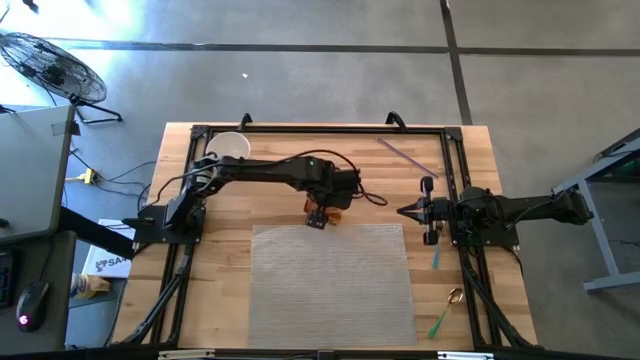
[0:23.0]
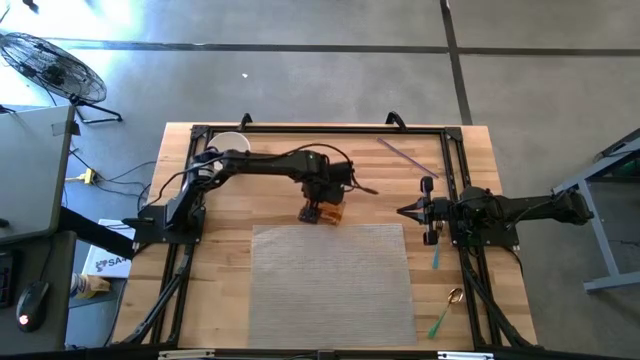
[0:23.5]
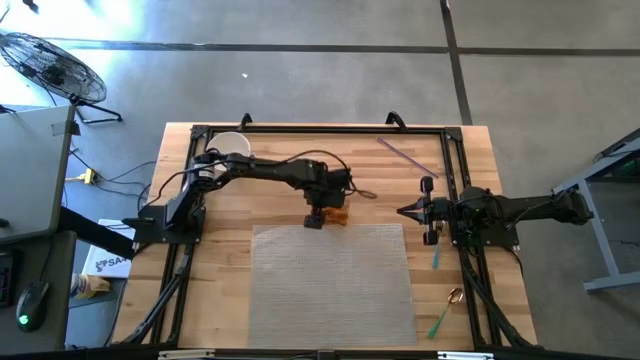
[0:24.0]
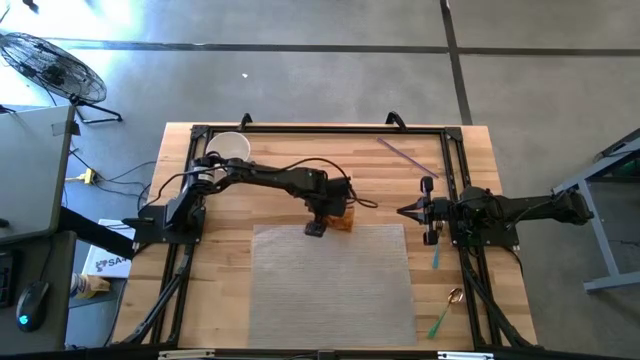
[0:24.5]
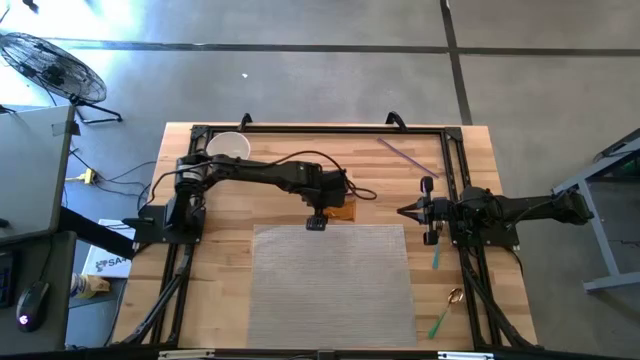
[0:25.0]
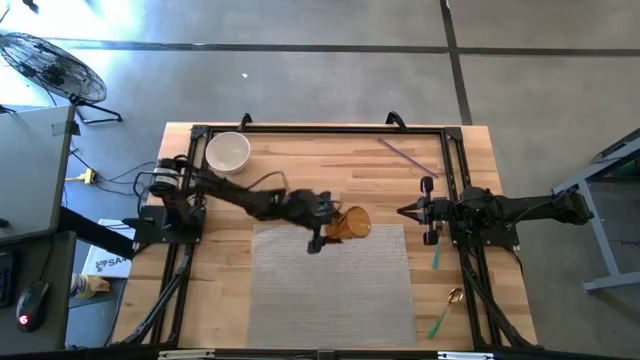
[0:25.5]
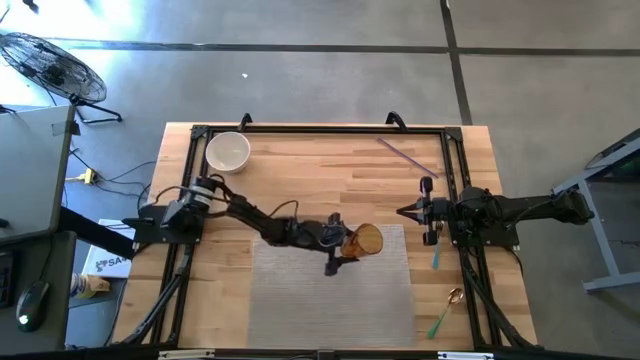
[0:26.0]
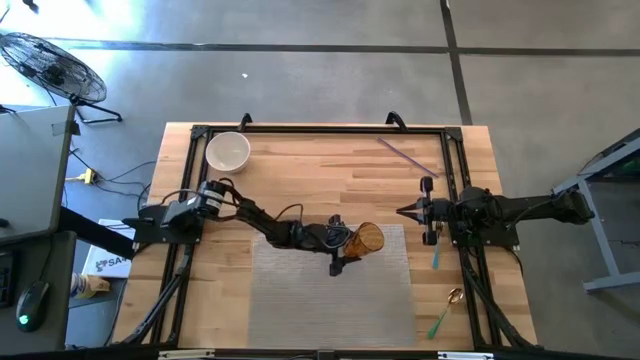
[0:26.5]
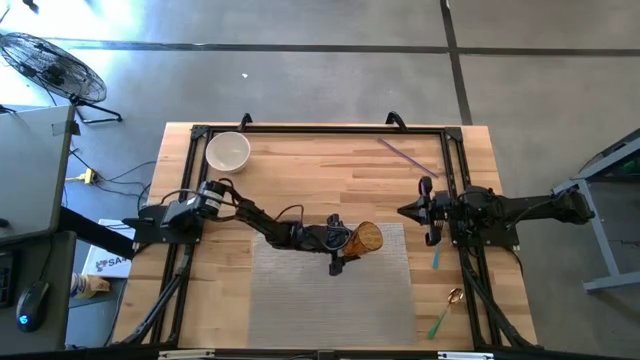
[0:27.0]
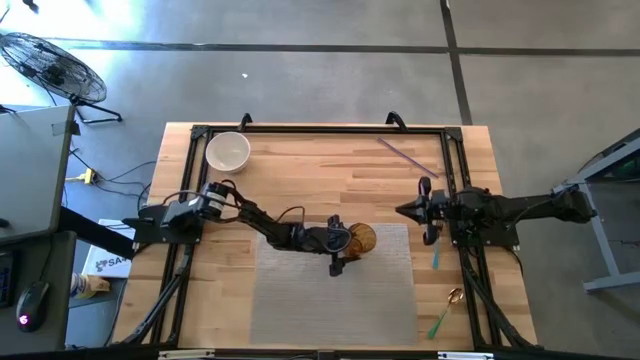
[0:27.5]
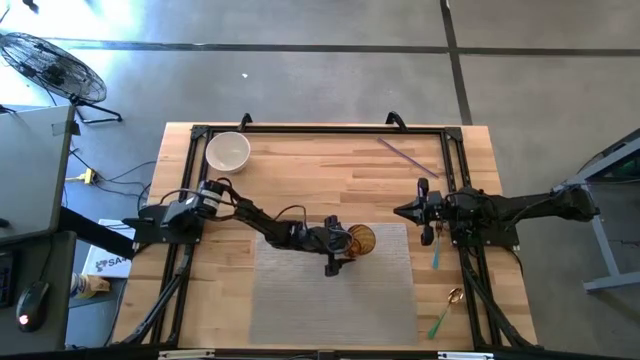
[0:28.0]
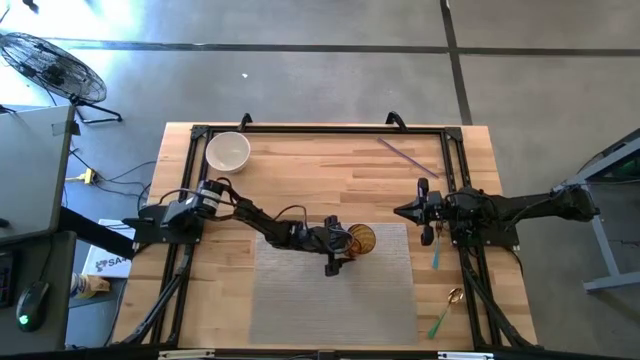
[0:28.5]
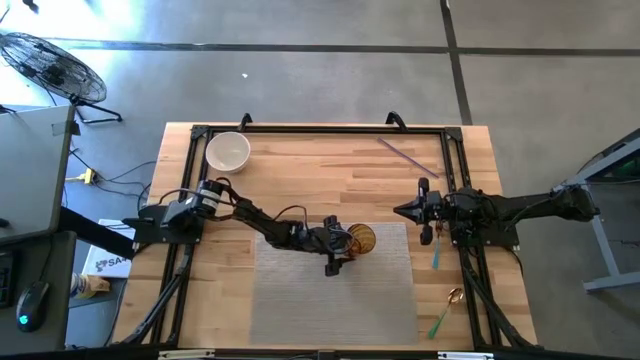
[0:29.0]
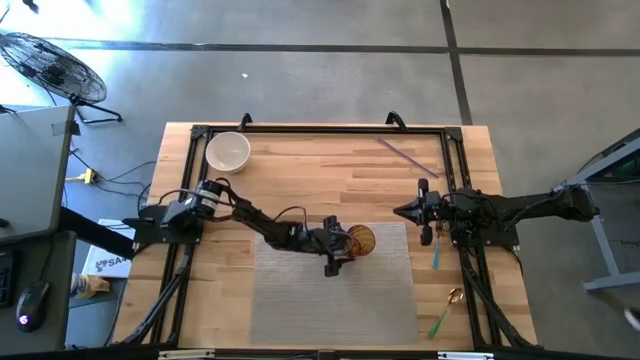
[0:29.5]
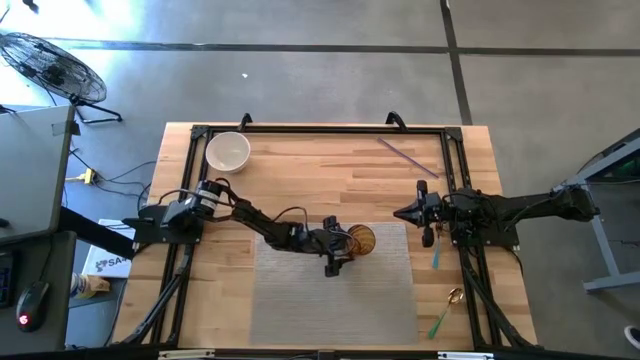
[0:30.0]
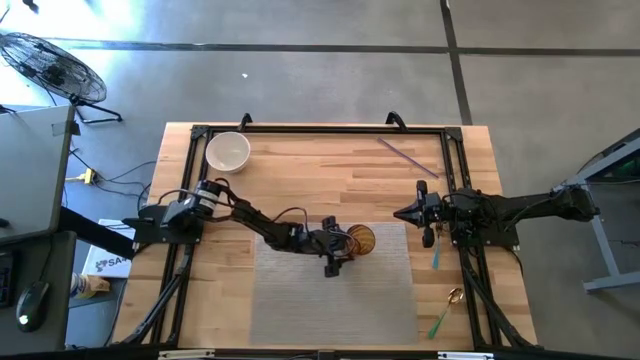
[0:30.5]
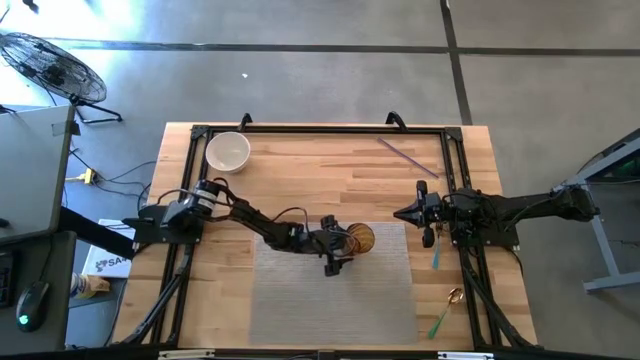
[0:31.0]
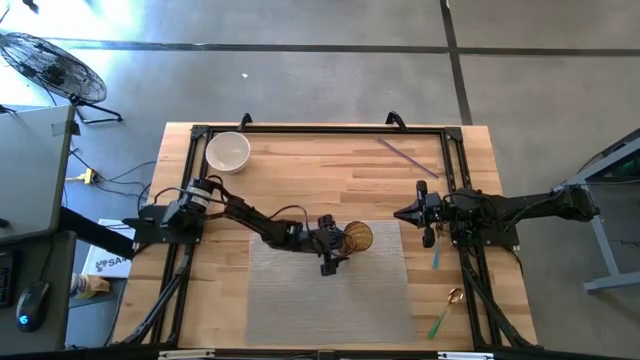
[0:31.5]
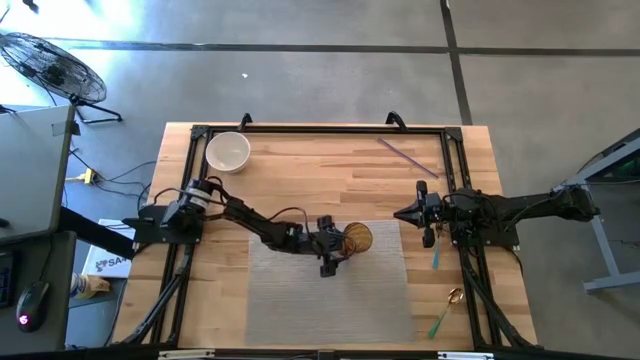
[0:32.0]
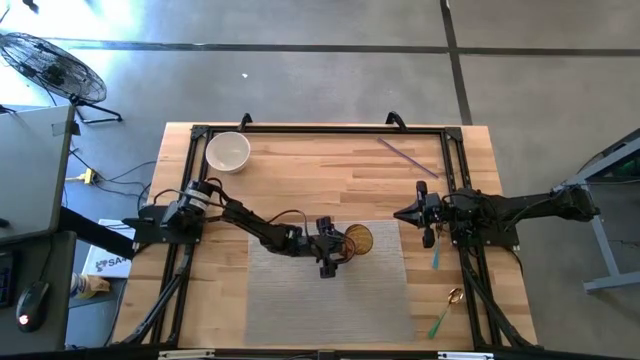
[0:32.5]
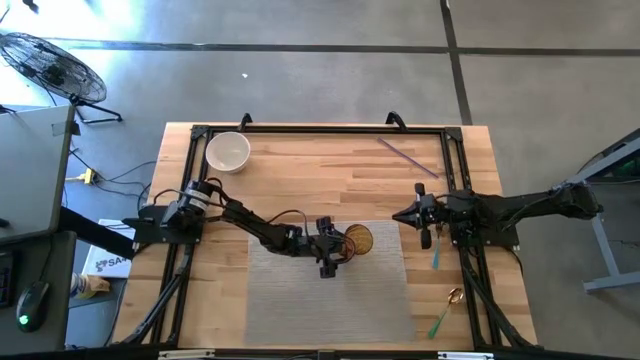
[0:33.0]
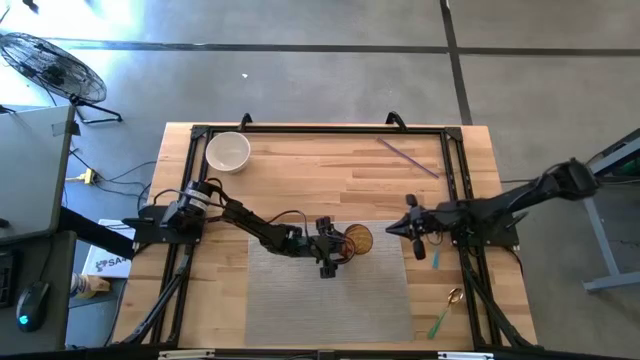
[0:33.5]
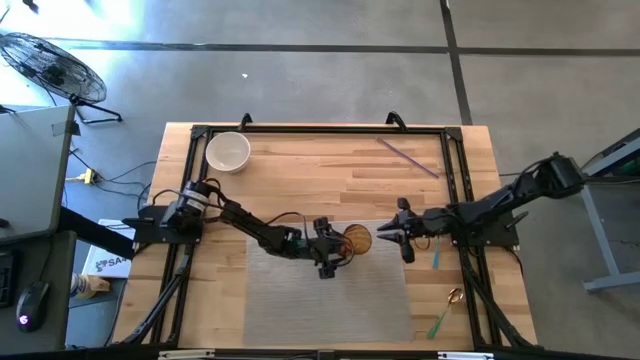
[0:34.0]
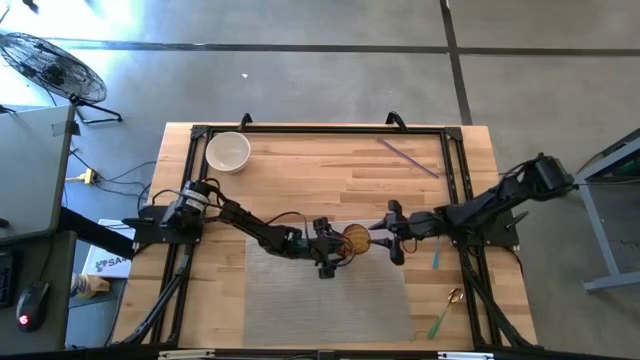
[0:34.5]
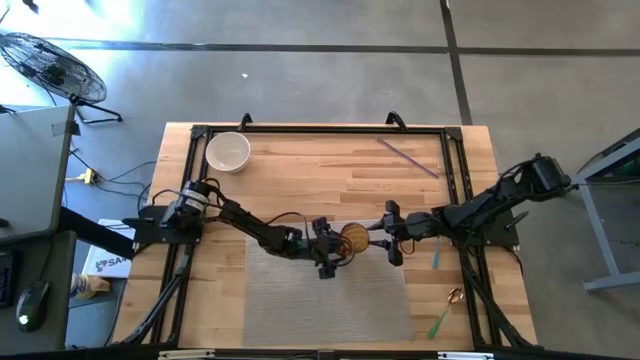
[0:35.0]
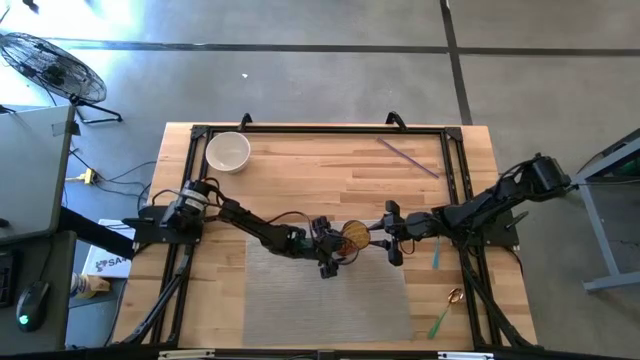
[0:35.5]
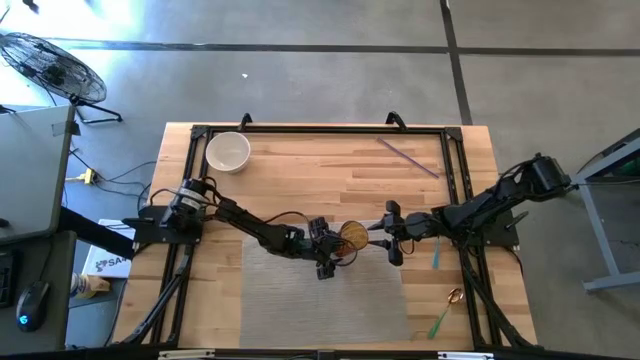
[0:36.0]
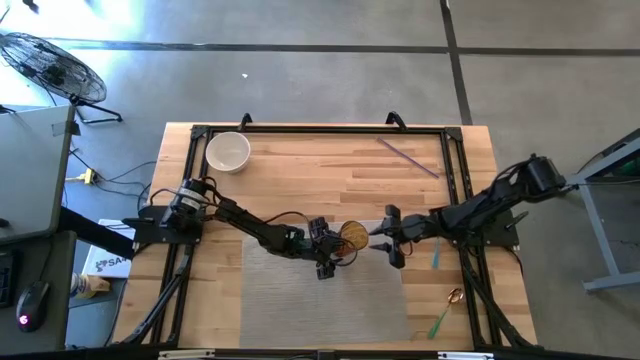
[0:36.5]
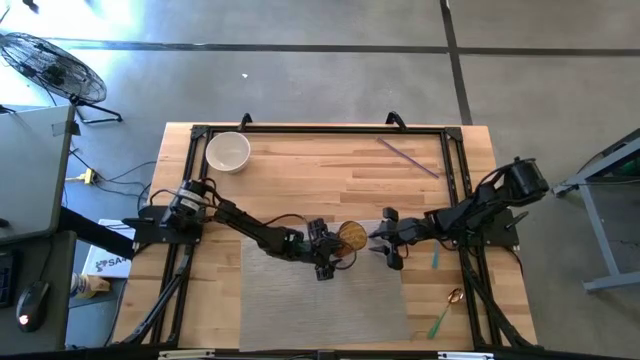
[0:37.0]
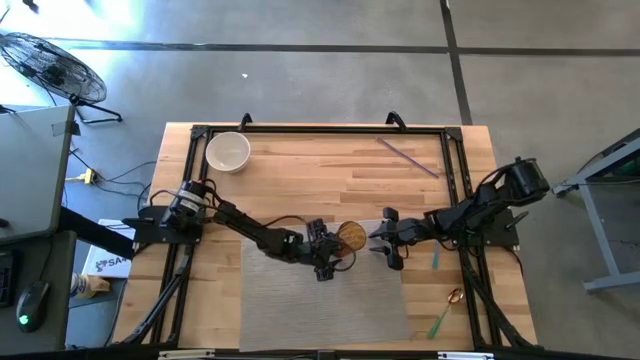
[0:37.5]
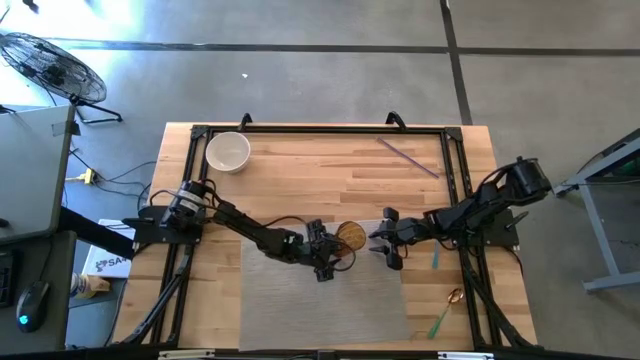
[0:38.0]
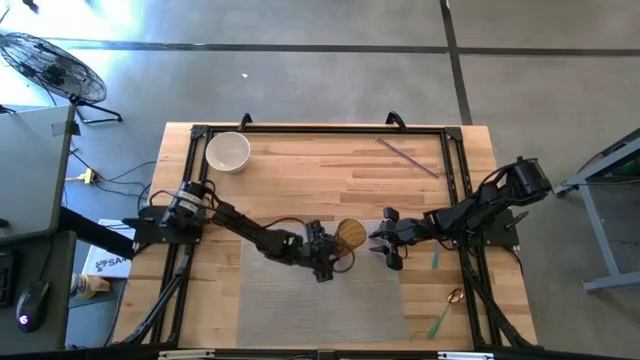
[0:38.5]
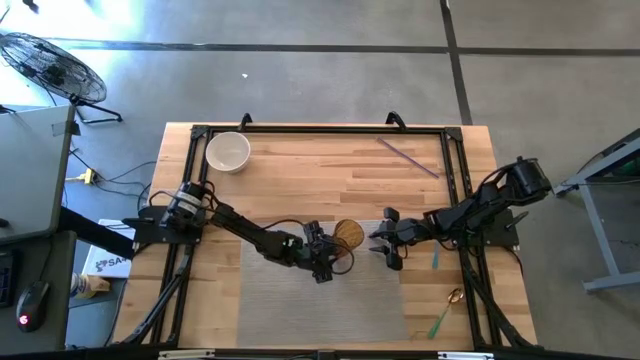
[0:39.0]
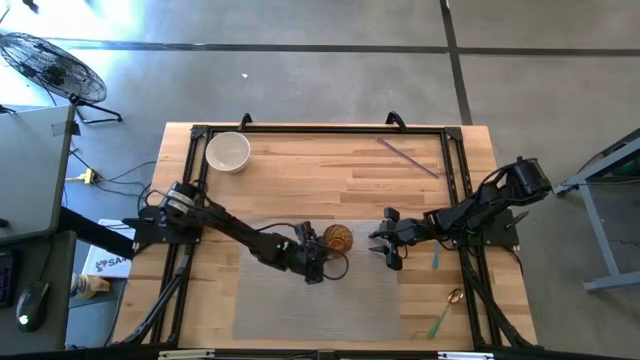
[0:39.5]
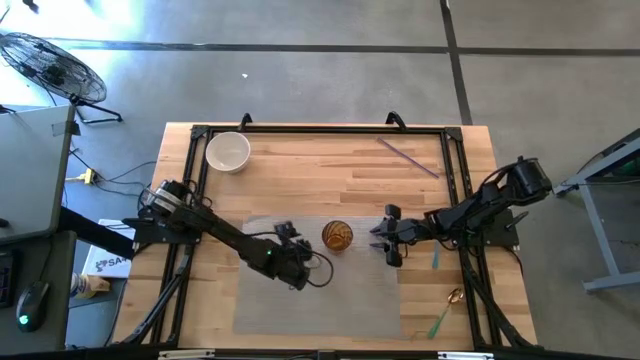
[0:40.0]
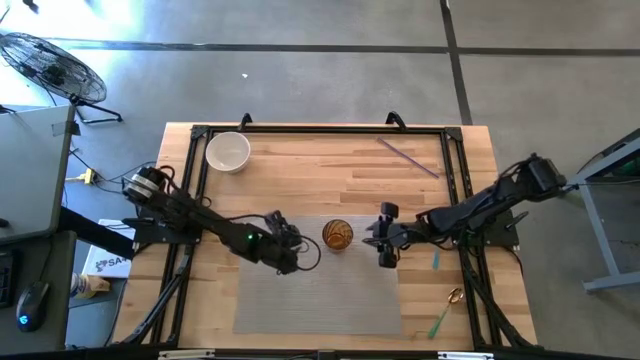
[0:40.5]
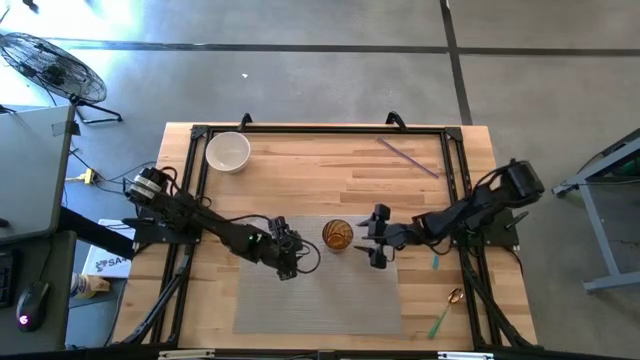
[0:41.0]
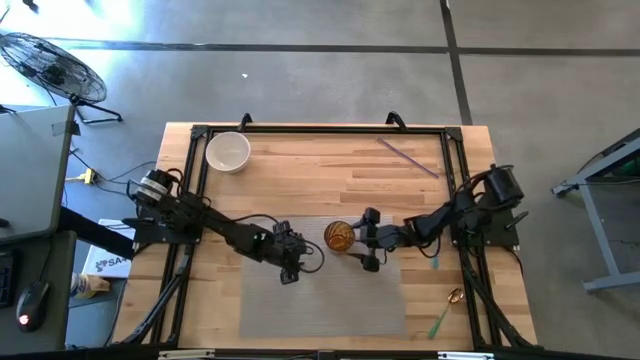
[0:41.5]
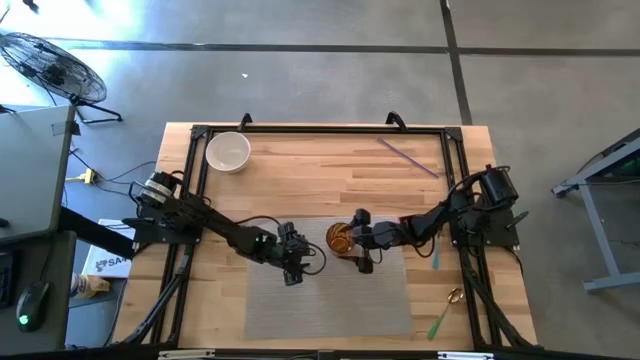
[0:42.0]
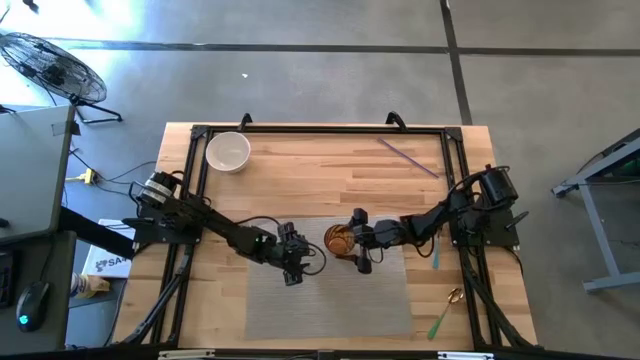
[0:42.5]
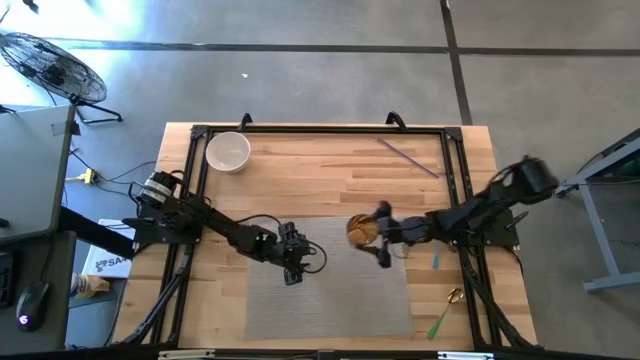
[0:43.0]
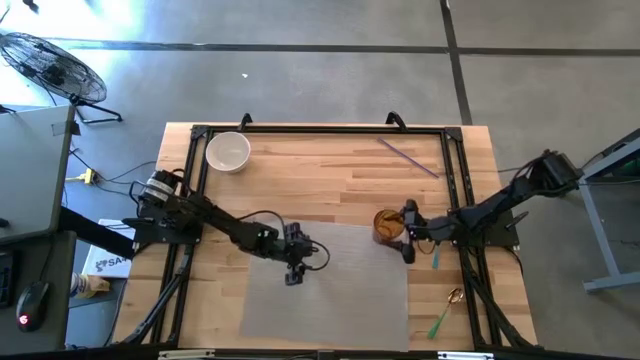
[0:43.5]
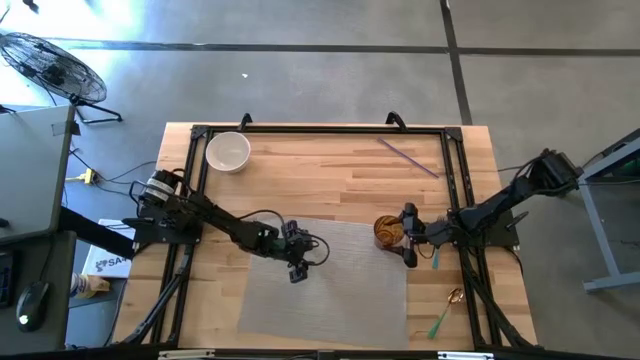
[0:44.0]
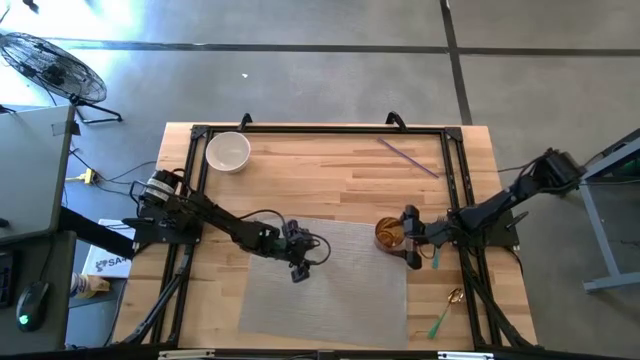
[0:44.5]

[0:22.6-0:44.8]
Task: Pick & Place Utensil
Put the brown cup in the top right corner of the gray mat

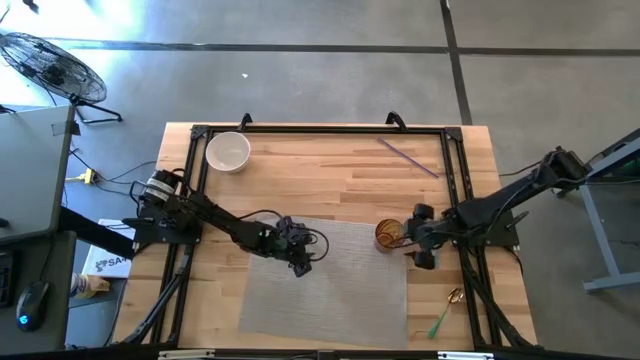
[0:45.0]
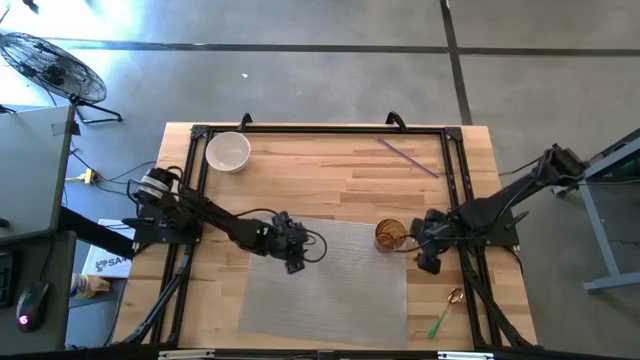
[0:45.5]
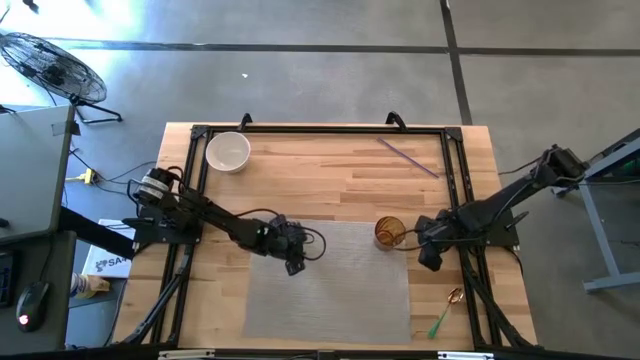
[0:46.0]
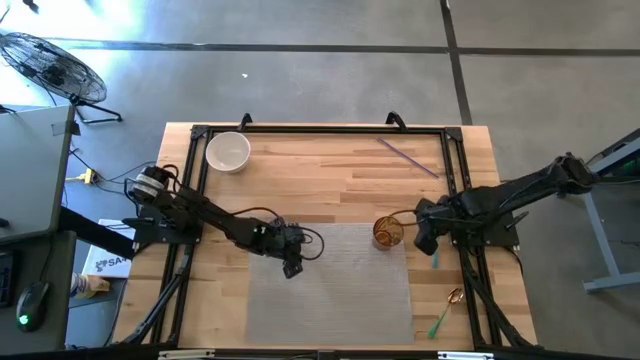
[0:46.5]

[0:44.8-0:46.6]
Adjust the gray mat
